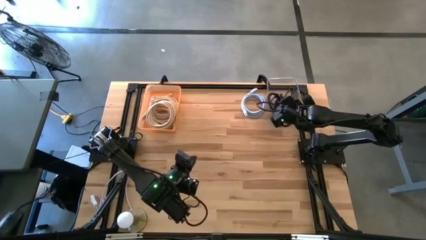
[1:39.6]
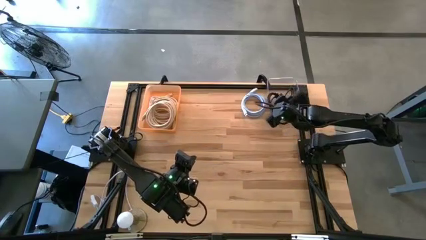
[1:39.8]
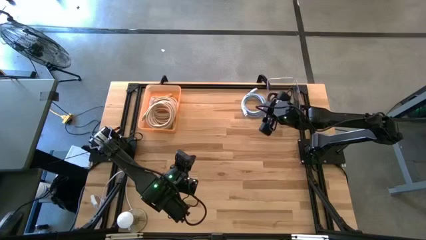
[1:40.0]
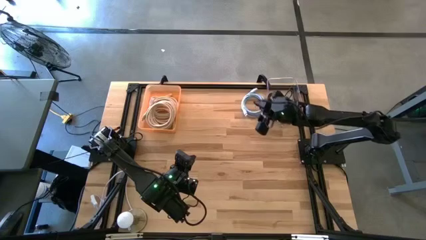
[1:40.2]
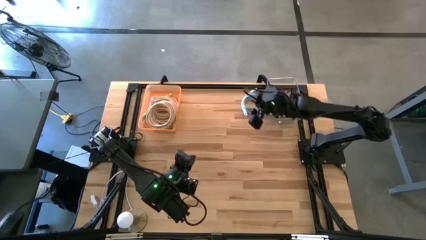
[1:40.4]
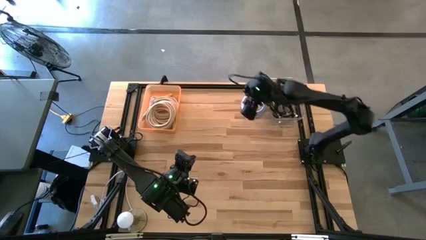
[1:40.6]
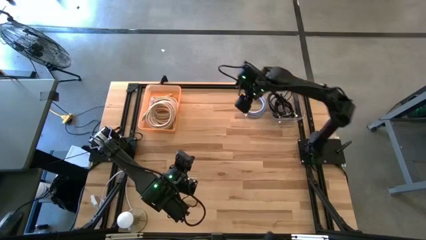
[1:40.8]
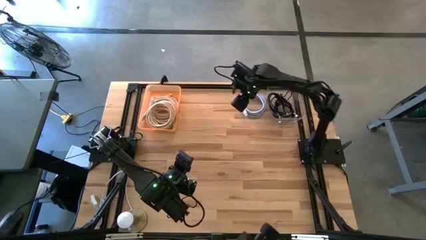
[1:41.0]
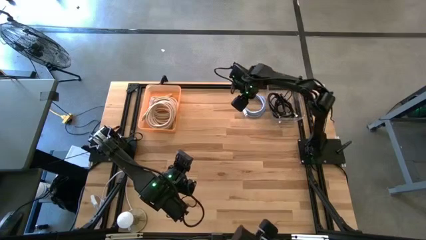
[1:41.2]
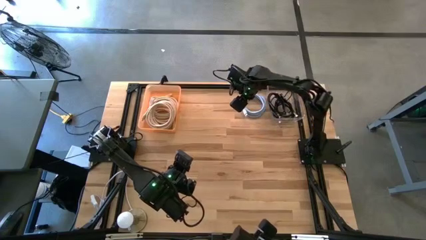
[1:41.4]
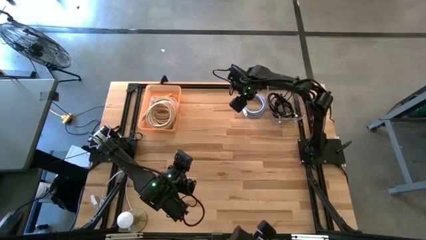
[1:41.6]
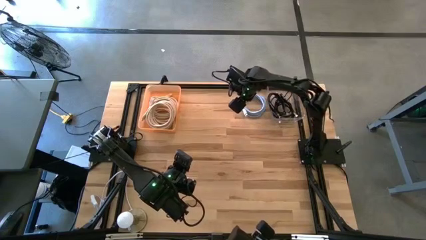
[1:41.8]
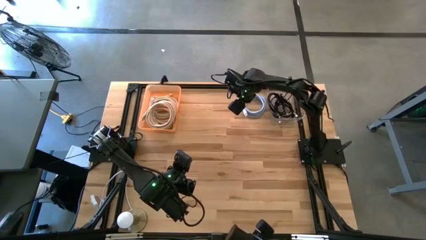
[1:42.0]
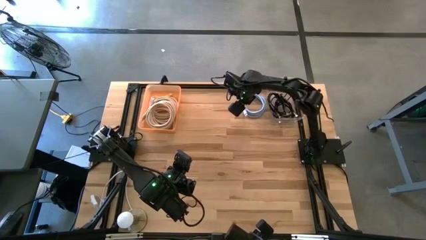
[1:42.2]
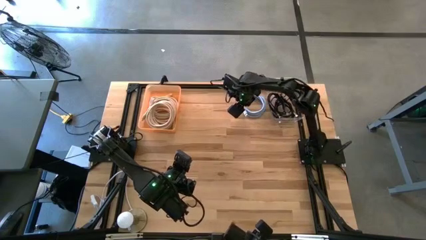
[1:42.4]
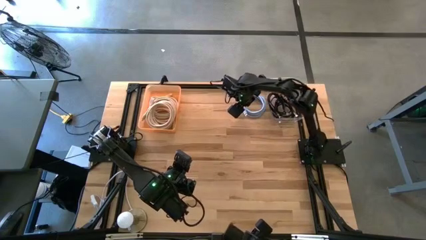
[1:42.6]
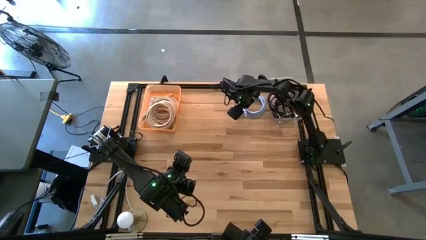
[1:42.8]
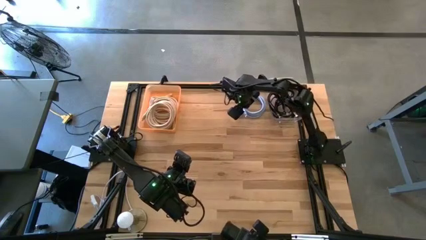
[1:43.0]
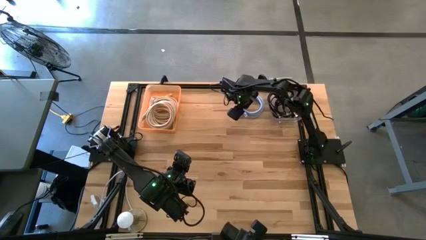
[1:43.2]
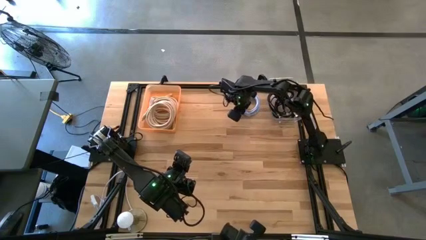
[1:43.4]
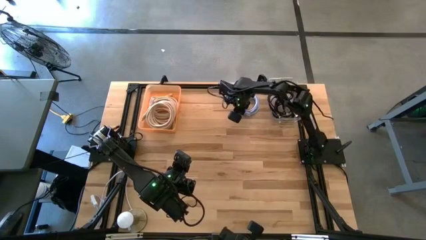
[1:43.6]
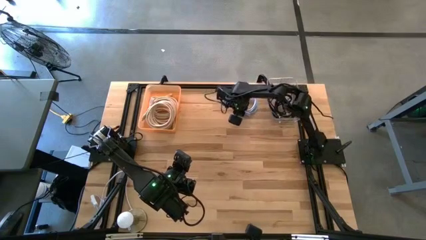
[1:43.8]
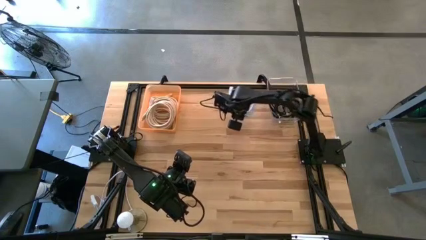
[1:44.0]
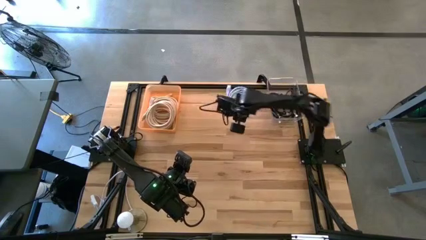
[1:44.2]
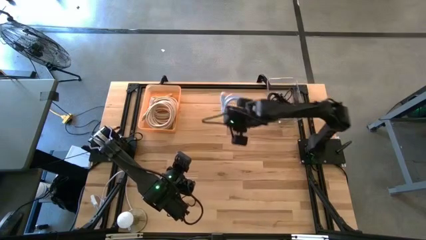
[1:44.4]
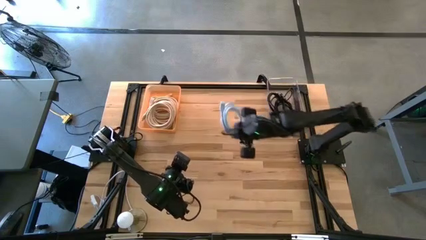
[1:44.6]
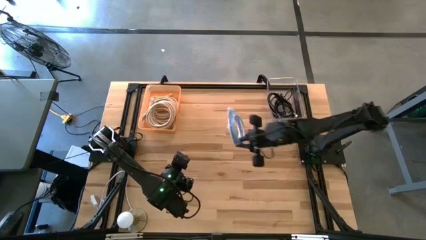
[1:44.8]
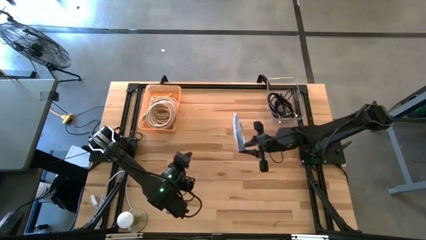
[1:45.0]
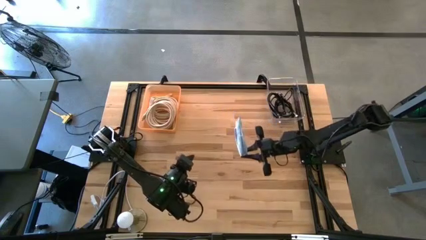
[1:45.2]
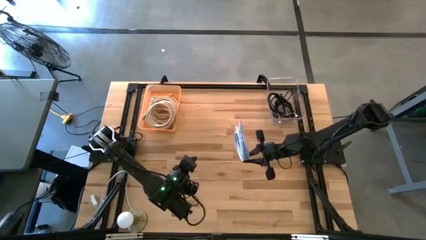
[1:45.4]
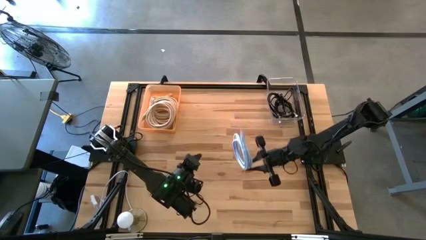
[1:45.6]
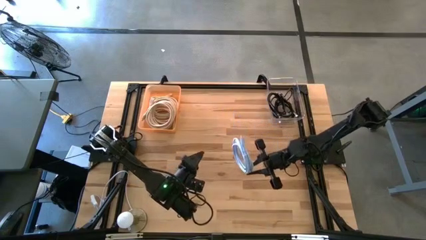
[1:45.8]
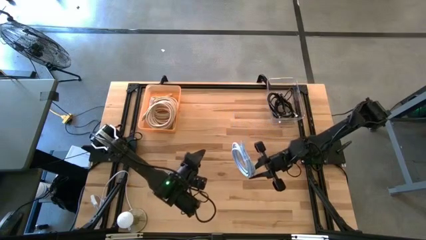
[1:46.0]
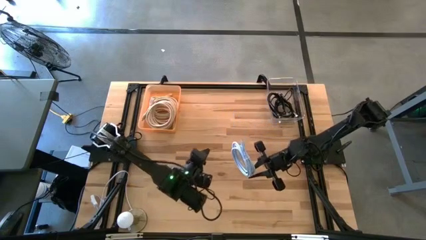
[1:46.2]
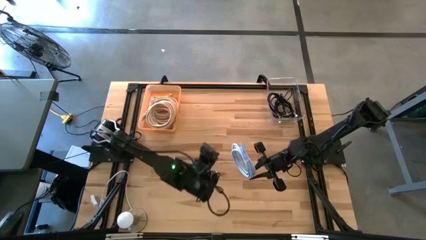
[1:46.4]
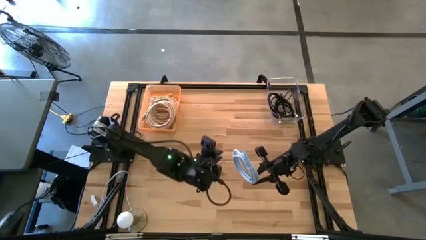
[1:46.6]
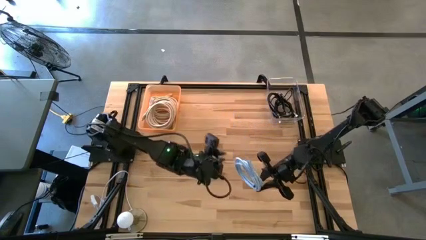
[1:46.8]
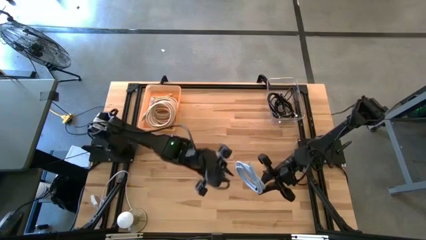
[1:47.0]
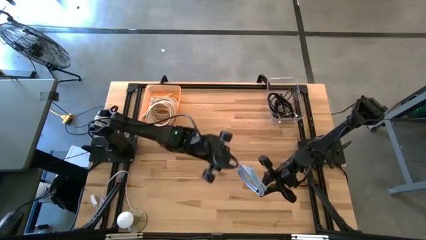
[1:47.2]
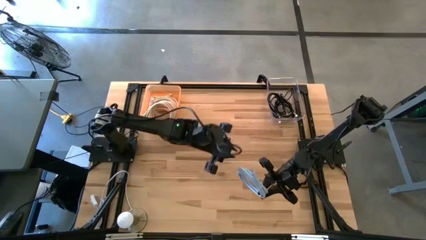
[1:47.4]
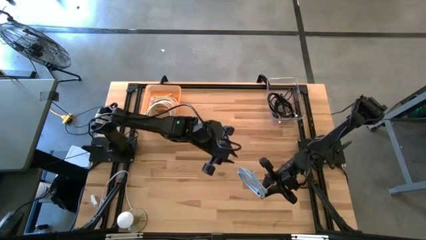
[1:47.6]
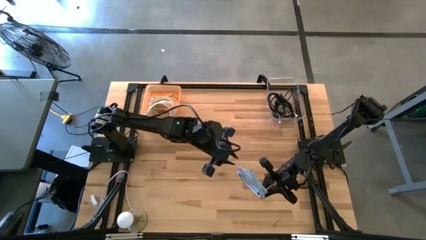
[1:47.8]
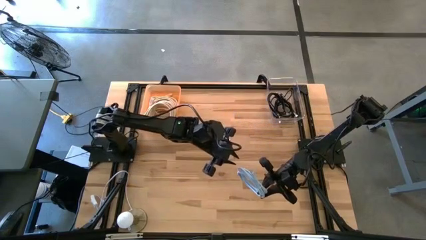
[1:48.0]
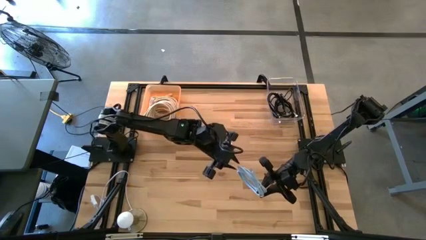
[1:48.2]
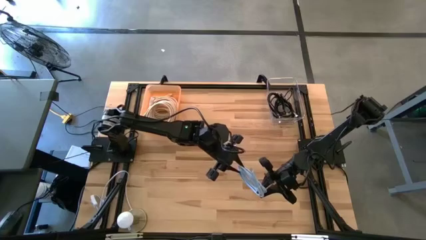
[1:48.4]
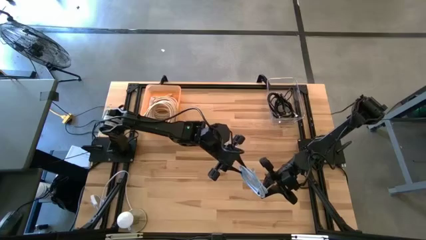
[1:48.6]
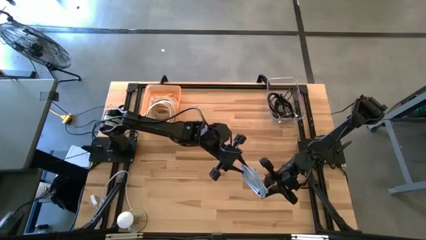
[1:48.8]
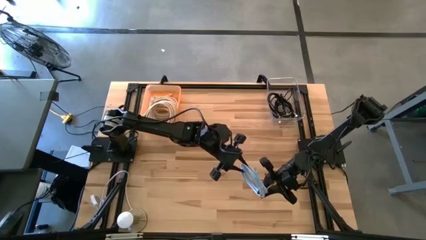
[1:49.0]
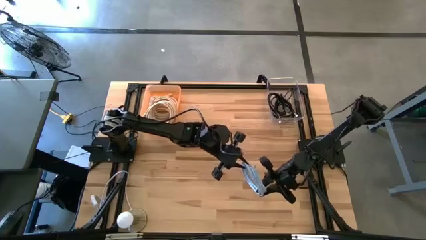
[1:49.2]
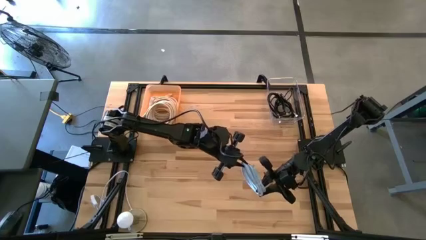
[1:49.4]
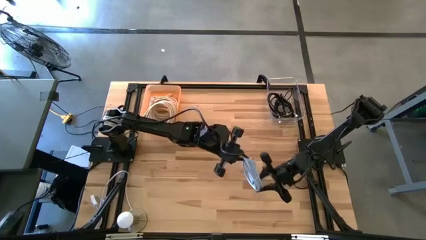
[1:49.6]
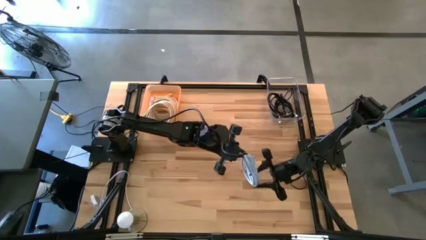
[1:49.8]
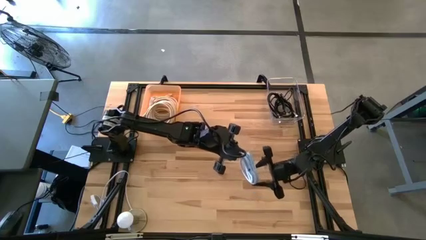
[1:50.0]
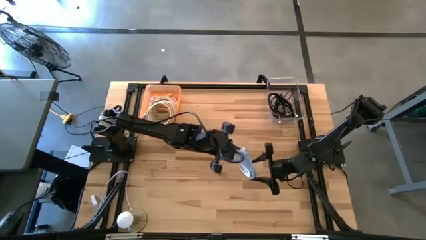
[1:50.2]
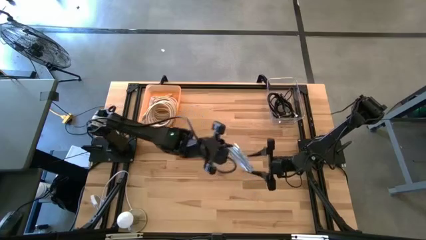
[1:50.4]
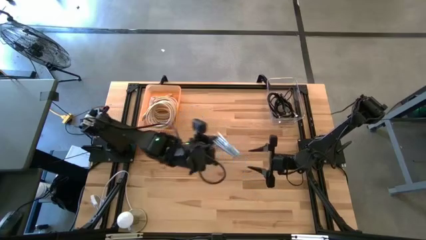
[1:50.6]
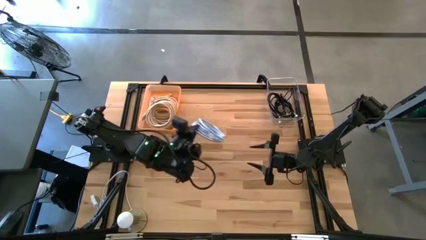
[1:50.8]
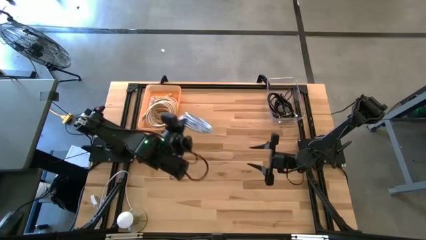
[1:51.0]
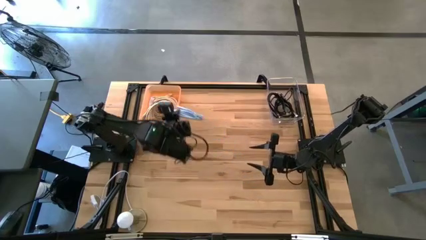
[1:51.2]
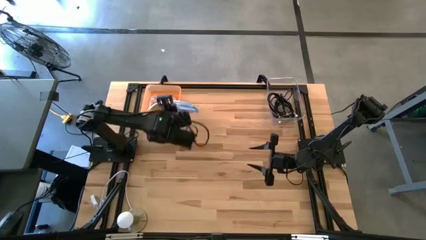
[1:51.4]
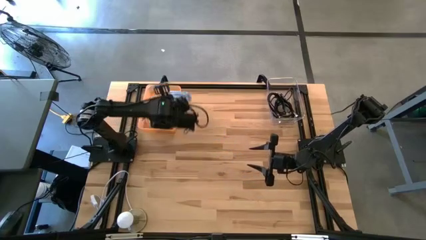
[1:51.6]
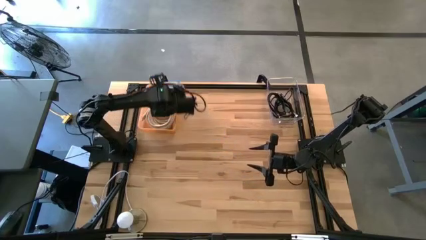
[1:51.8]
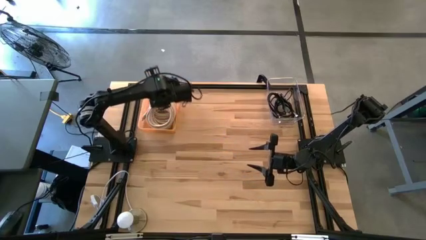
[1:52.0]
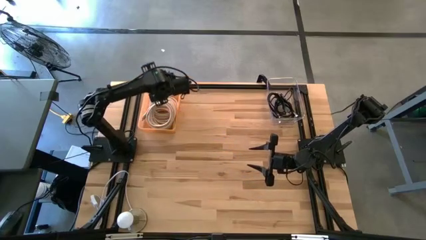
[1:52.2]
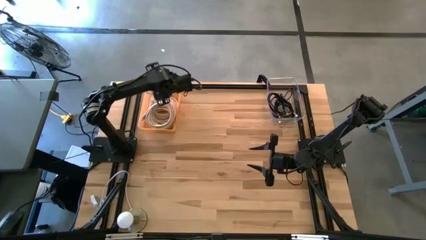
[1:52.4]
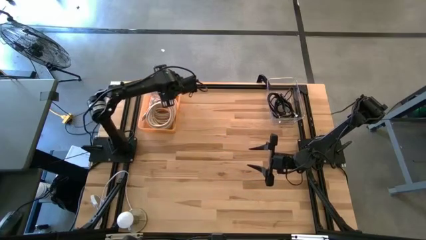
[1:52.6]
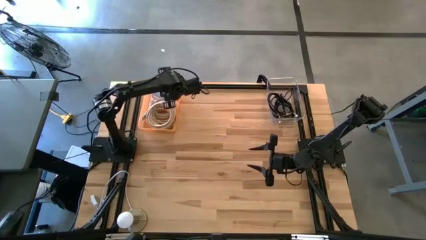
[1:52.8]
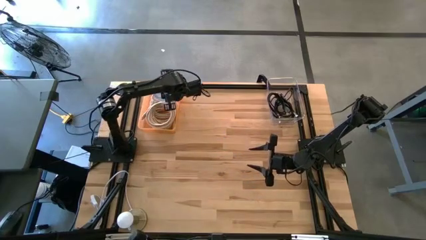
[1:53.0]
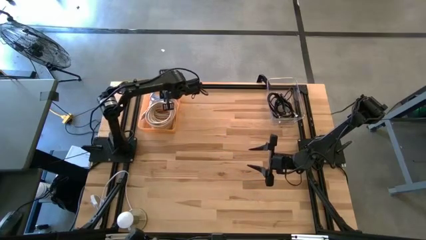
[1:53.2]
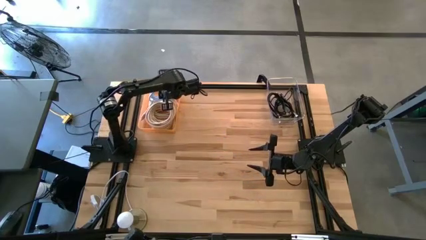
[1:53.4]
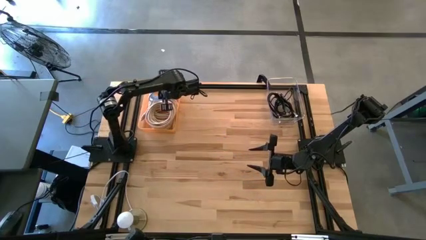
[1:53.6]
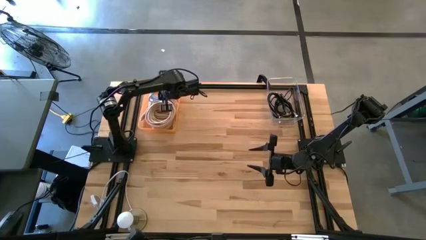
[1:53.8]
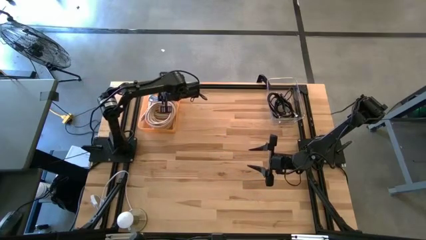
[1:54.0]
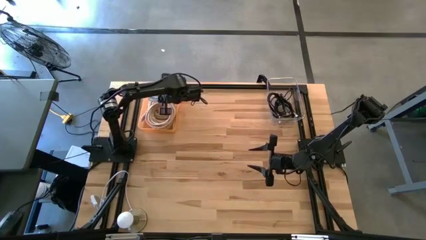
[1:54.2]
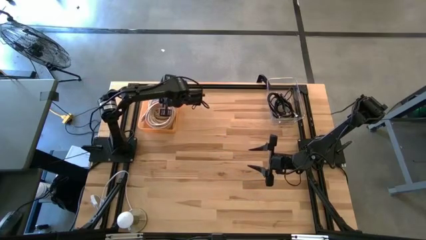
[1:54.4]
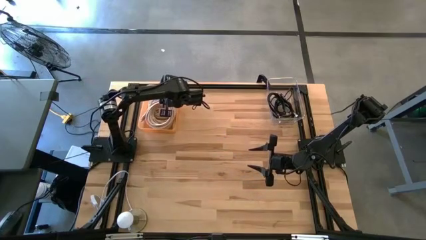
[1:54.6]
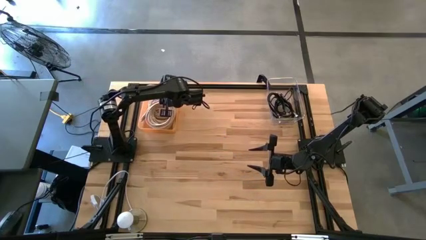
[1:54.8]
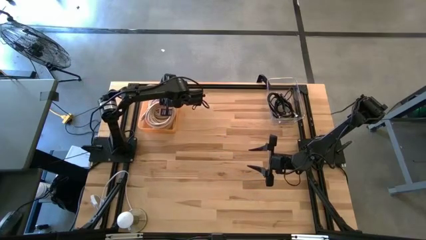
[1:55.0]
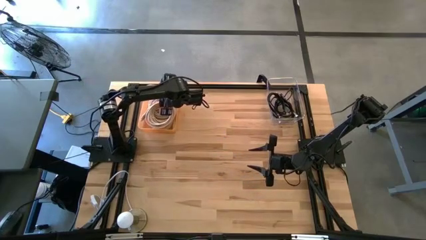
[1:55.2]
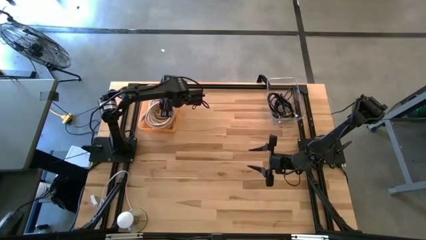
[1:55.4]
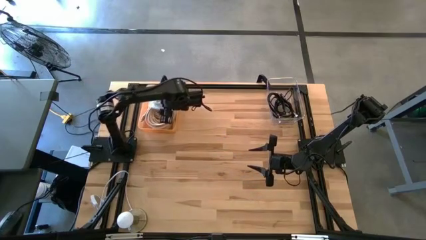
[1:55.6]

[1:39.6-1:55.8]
Task: Sort HDMI cables
Put the blue HDMI cable into the orange bin
